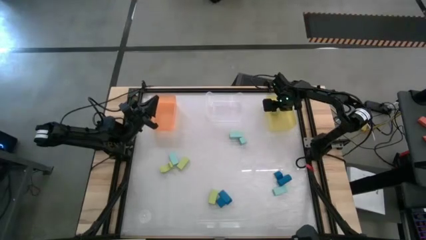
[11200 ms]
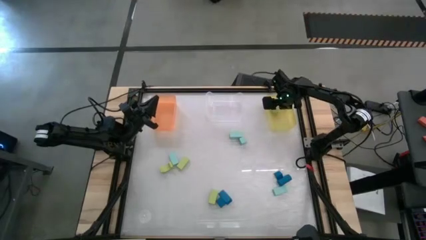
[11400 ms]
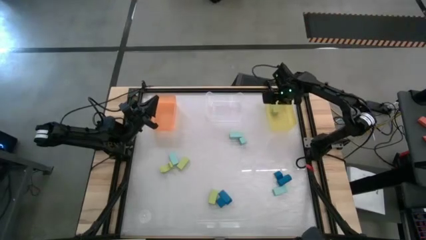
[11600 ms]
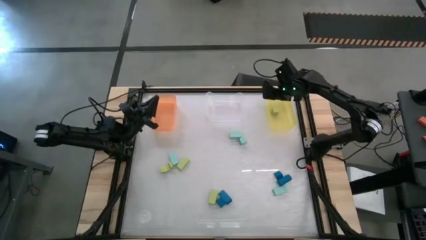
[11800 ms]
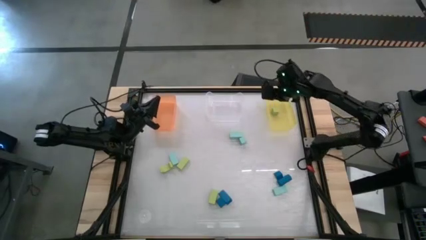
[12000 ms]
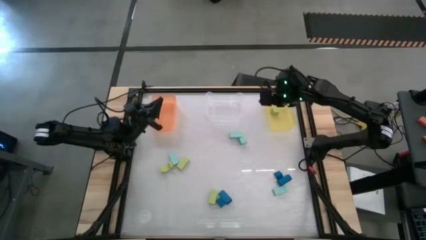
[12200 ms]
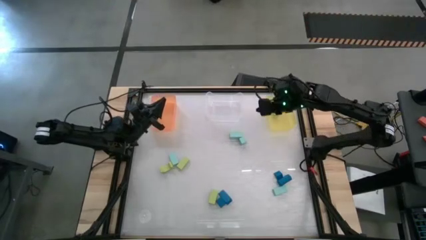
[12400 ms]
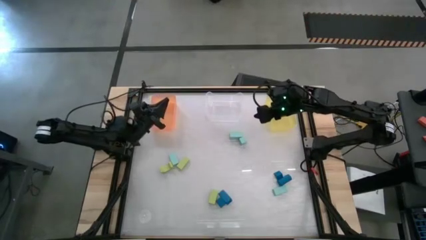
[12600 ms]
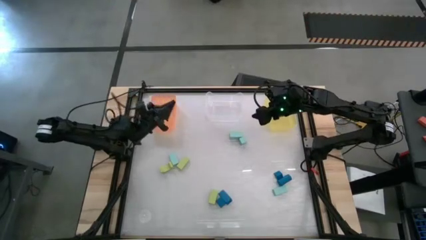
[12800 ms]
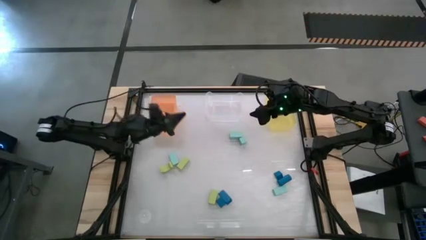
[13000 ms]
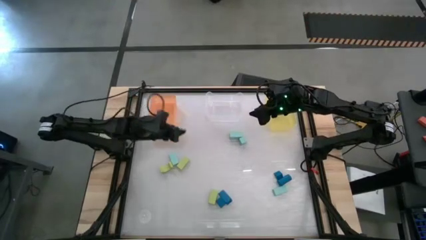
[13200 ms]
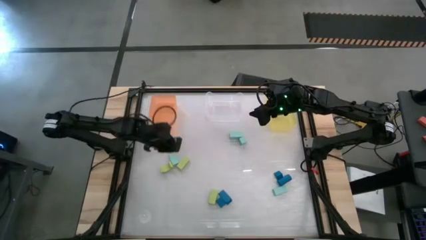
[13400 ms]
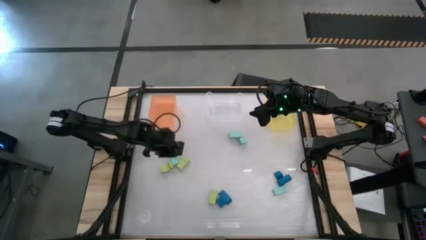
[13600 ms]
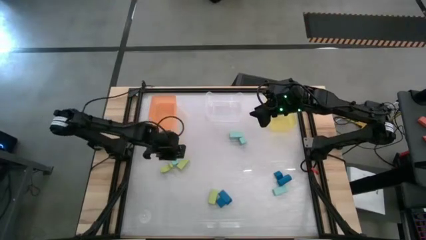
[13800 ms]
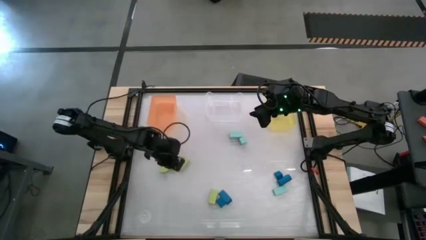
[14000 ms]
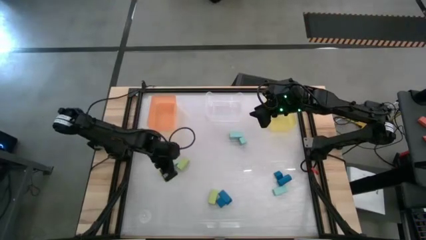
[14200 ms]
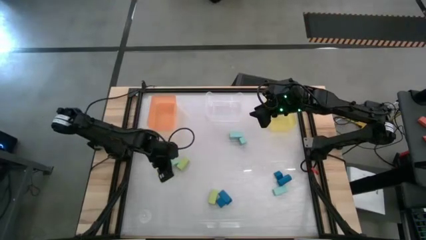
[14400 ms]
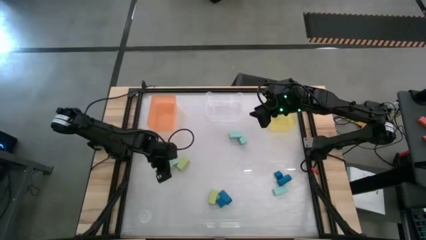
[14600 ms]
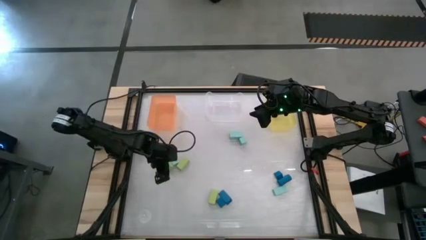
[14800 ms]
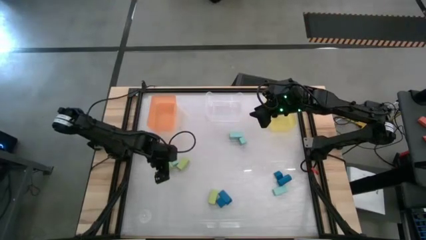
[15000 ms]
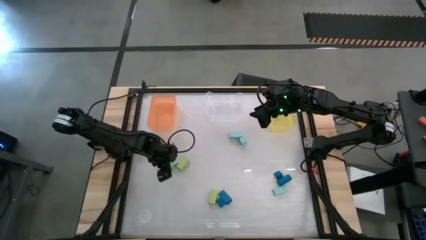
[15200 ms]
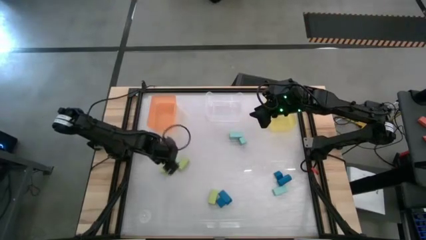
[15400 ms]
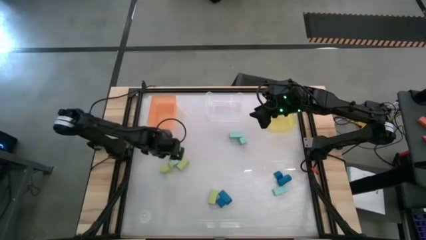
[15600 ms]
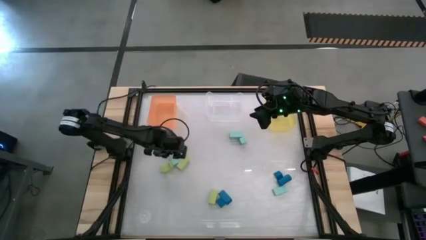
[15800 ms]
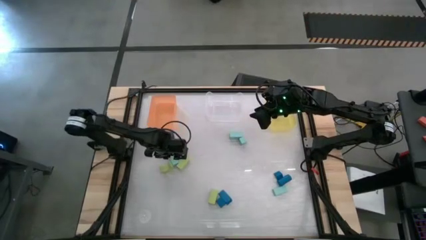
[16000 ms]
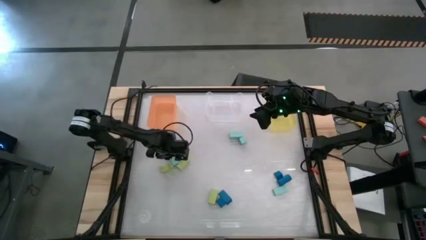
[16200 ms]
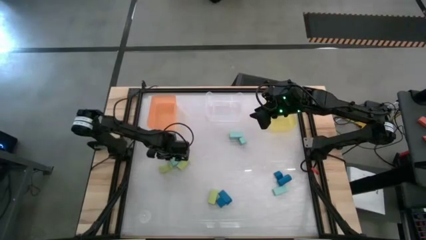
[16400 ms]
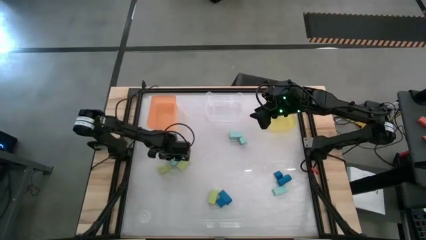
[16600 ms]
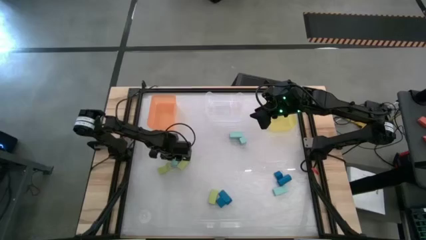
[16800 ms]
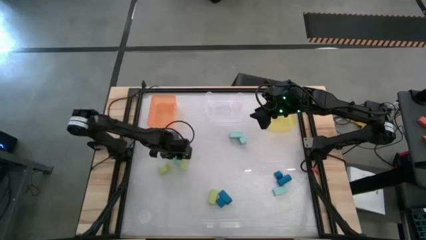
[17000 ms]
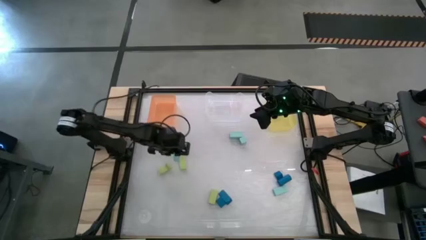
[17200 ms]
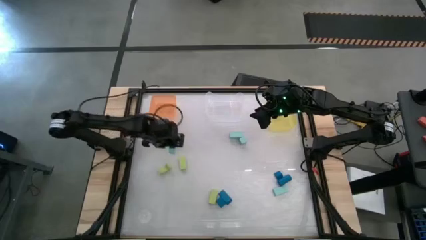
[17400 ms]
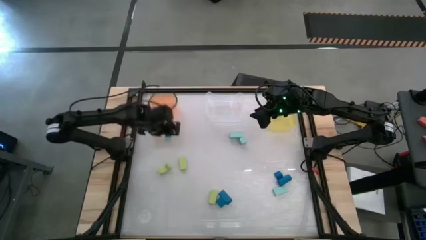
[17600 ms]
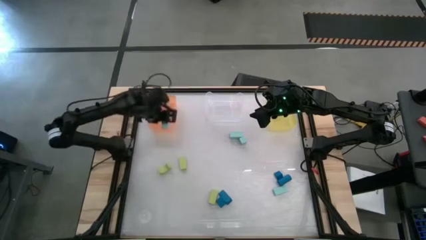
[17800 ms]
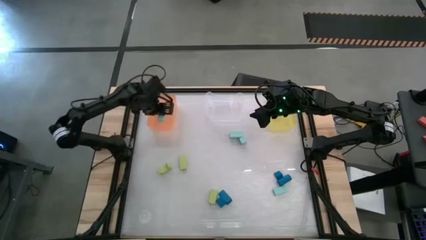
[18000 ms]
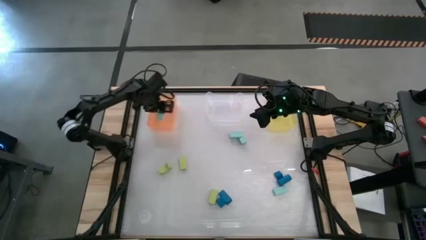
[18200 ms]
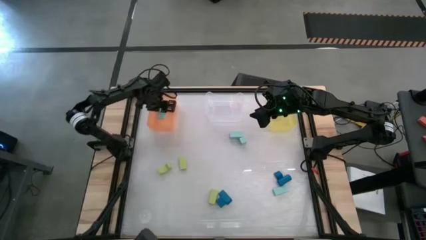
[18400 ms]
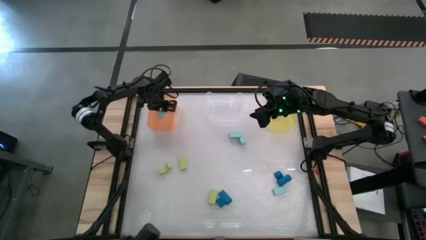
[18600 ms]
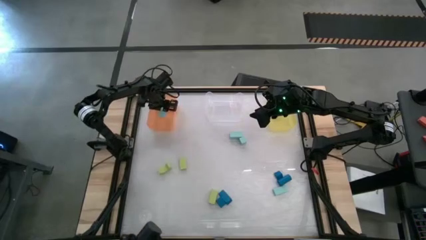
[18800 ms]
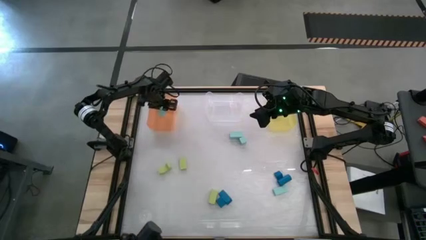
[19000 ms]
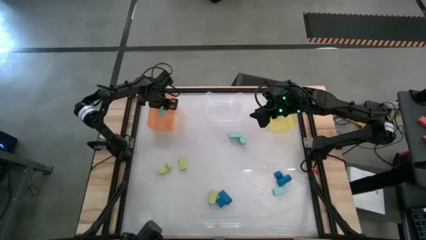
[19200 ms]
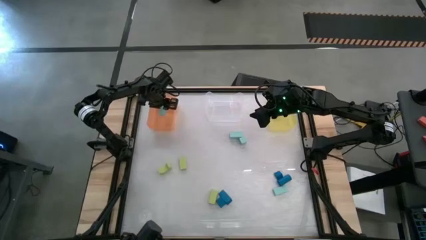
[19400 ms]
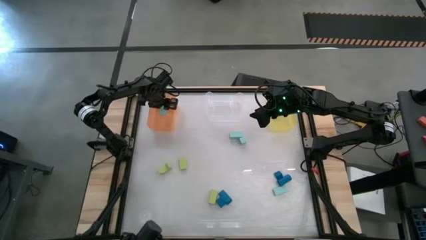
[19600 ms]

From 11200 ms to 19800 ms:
Task: Sort & place blocks by color
Put the left light blue rectangle block into the orange bin

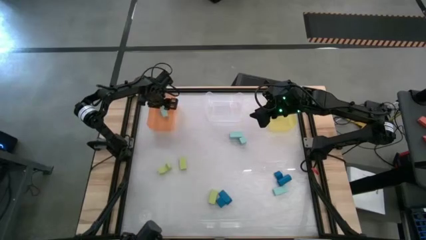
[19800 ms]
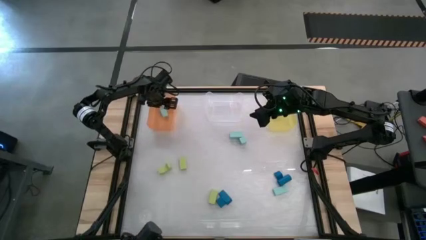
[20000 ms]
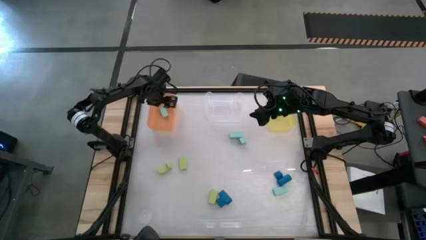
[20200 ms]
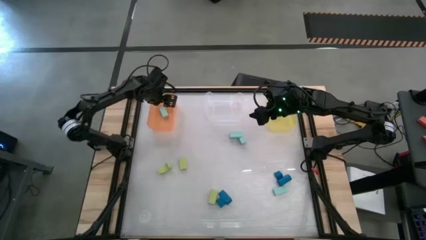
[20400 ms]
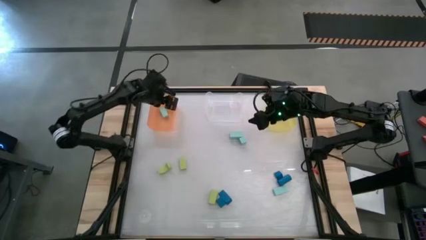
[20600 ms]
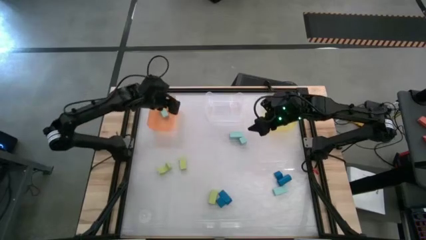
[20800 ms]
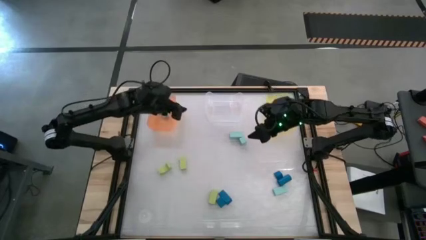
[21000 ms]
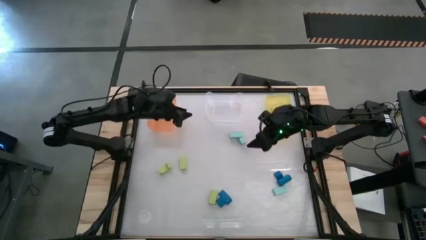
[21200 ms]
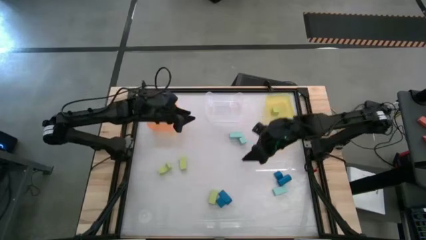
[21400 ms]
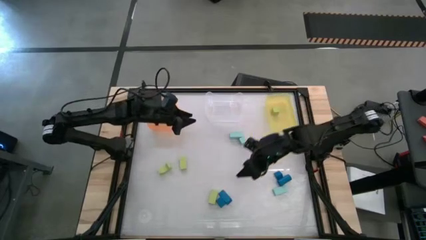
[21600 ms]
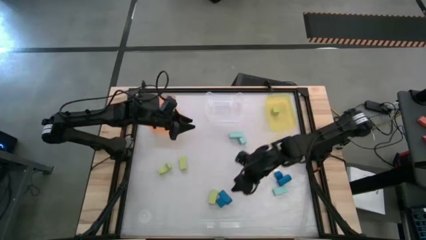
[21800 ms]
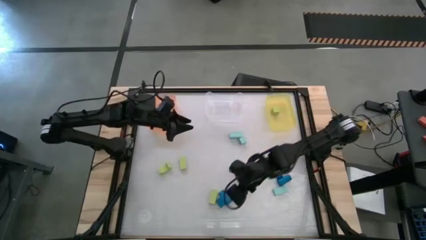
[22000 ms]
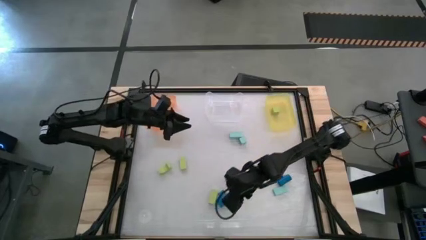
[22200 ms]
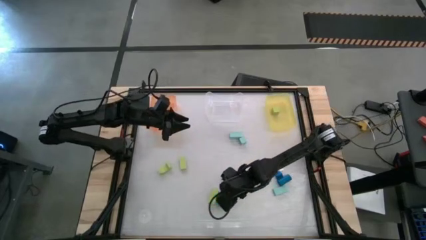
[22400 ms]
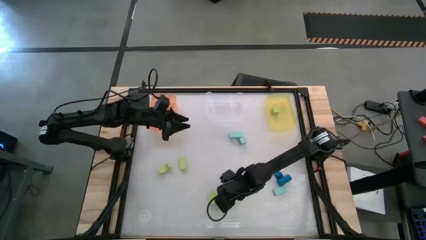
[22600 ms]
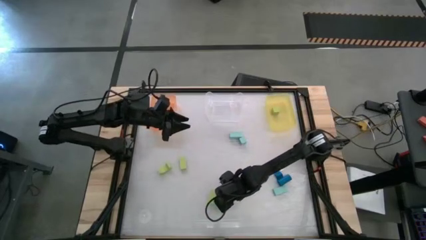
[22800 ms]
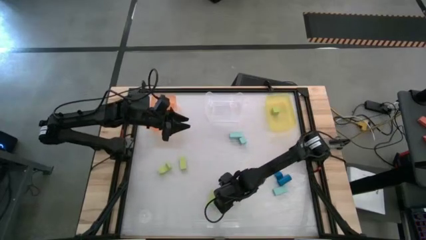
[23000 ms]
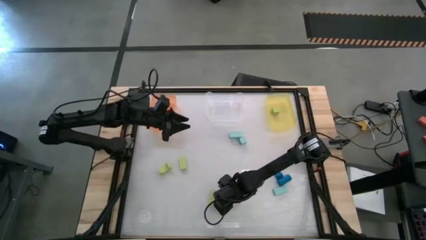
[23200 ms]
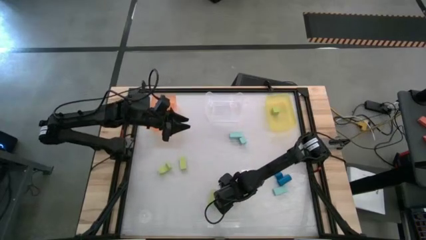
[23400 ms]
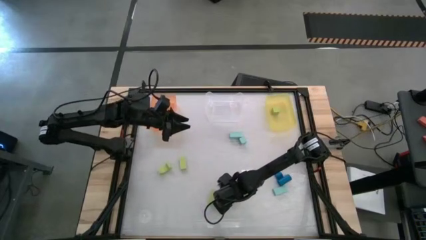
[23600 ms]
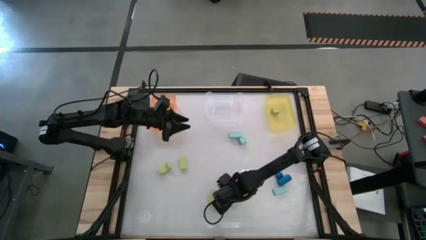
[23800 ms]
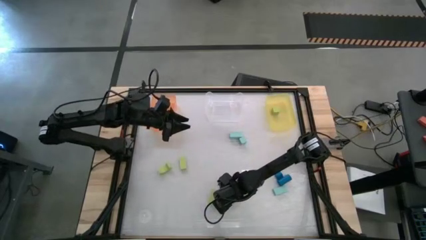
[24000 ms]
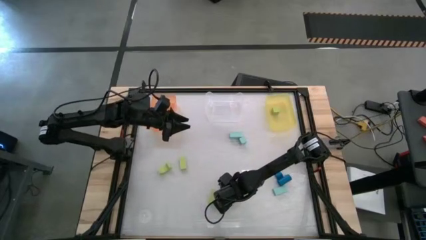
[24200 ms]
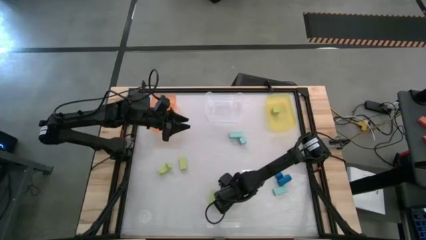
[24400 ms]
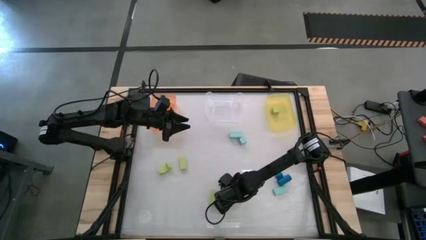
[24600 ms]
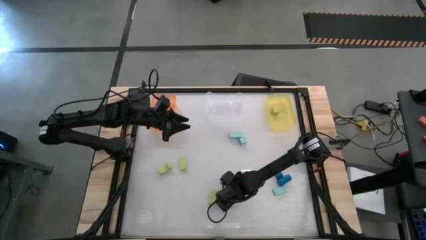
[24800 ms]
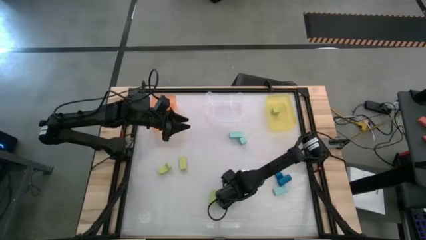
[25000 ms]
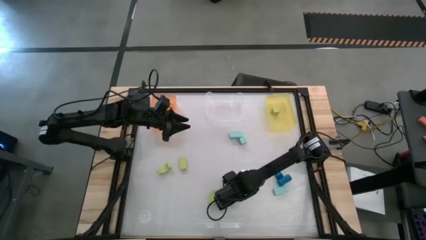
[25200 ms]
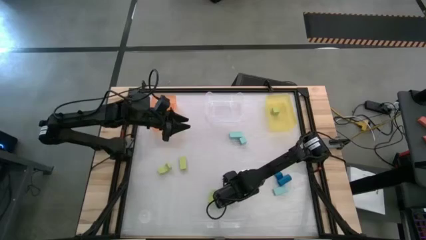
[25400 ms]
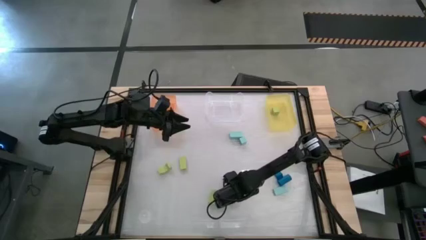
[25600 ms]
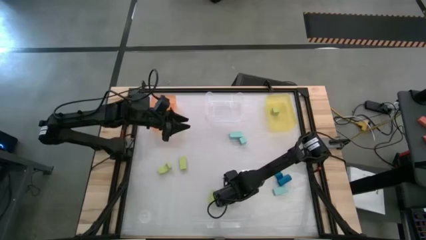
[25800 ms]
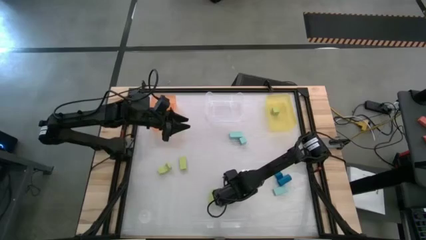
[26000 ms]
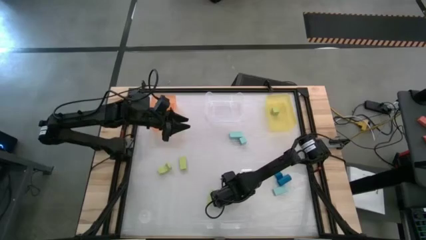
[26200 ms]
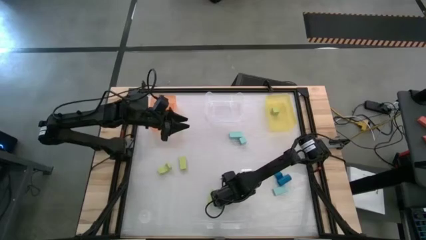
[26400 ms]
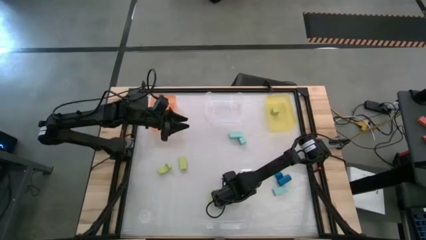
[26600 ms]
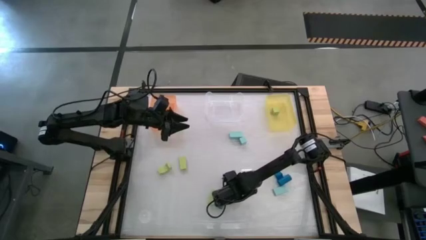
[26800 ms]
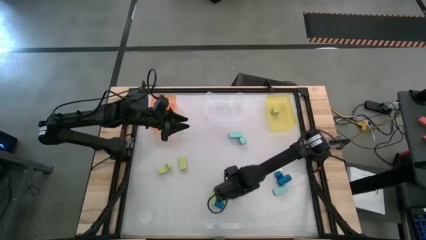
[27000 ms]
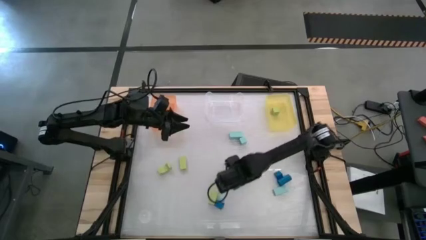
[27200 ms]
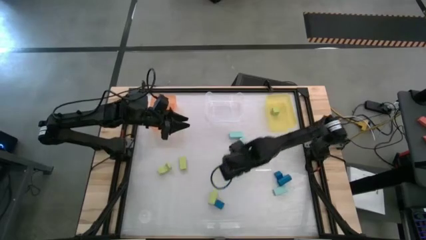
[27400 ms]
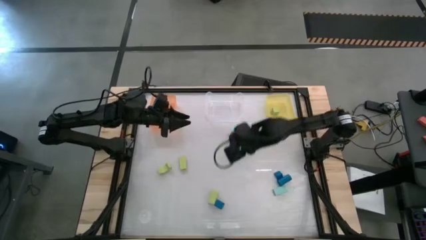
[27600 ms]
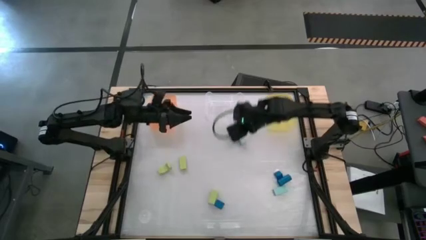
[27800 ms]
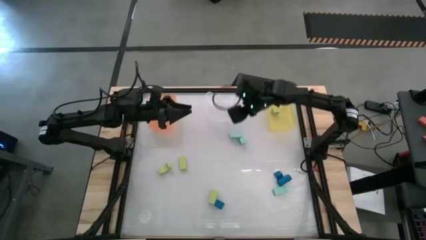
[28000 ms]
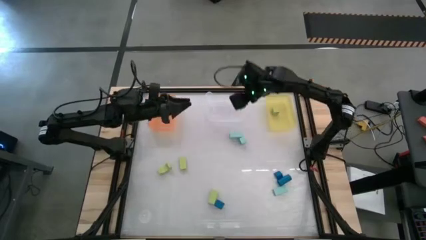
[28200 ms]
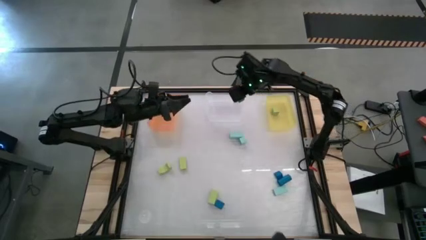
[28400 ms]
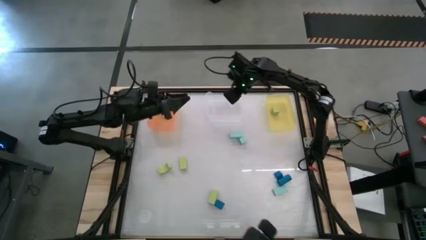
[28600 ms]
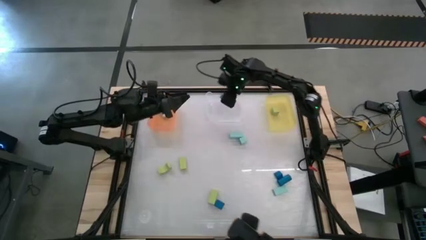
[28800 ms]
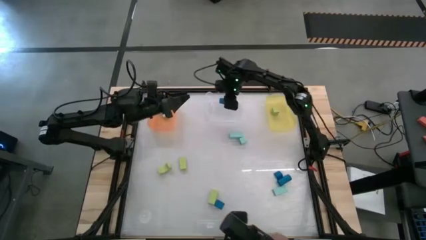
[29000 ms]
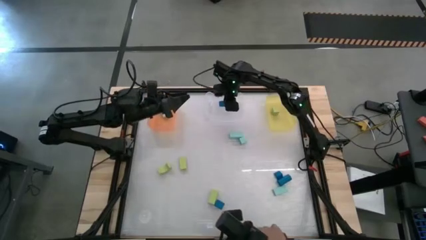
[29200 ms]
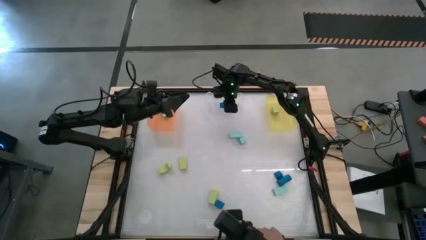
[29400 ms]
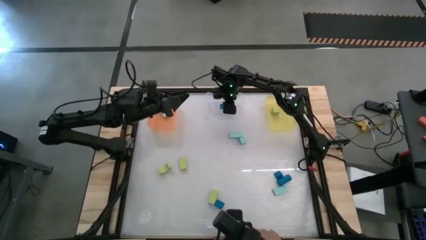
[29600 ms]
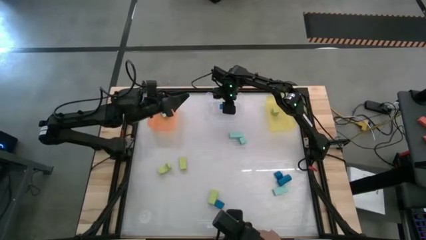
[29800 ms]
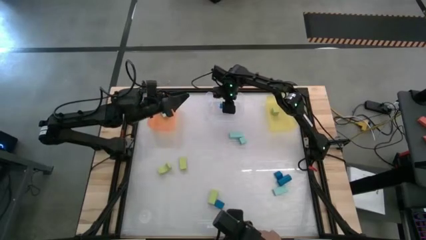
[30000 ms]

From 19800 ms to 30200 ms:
Put the blue rectangle block into the transparent bin
